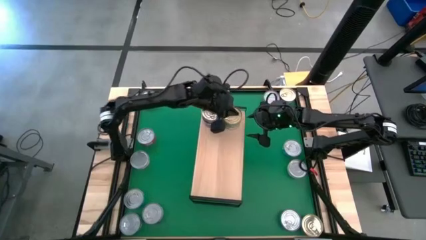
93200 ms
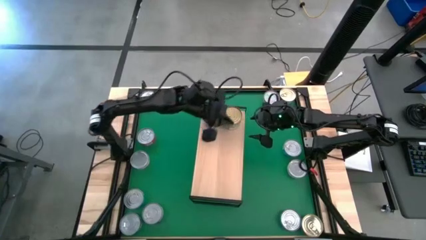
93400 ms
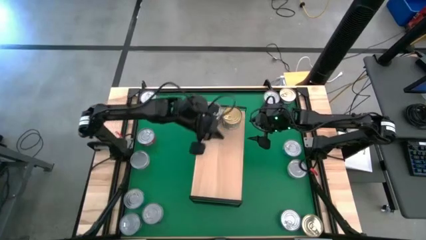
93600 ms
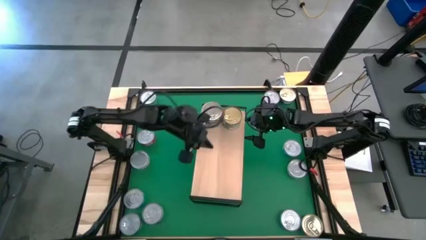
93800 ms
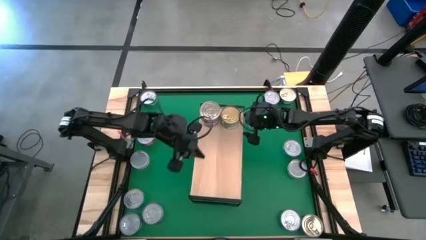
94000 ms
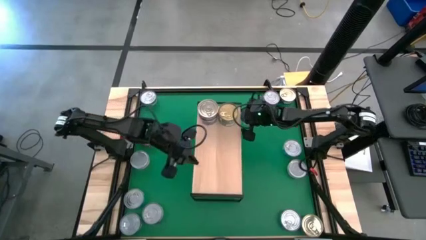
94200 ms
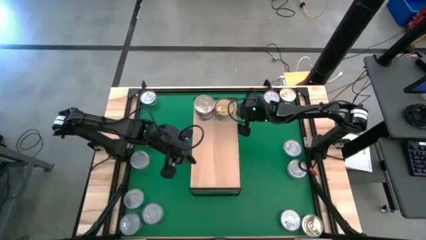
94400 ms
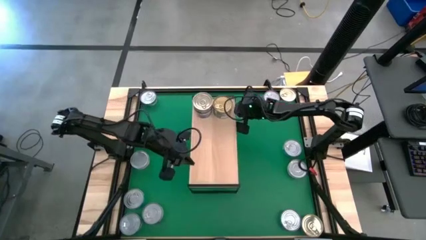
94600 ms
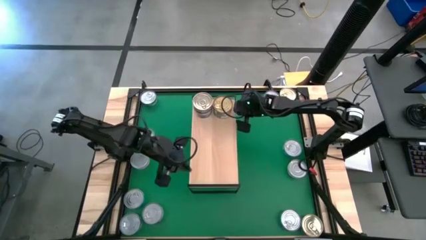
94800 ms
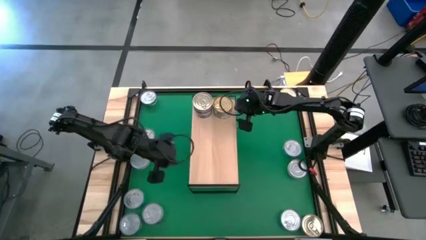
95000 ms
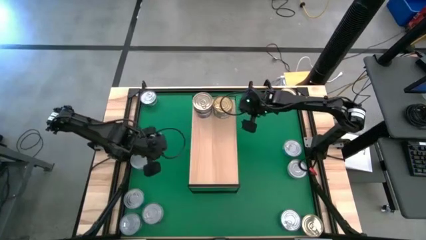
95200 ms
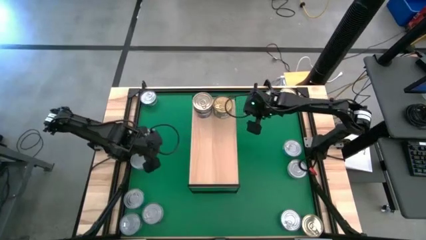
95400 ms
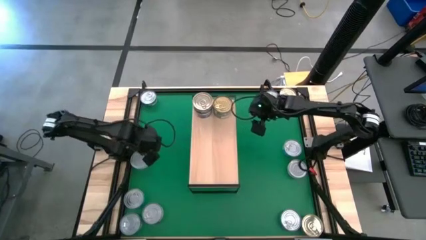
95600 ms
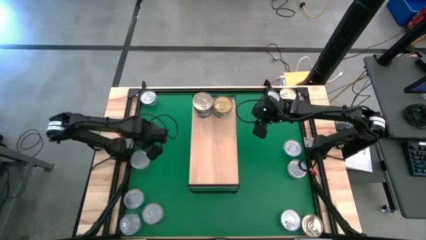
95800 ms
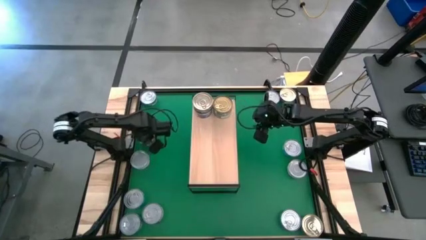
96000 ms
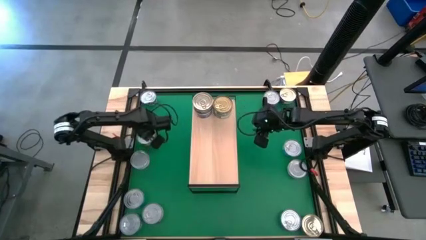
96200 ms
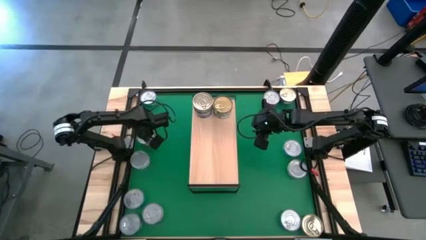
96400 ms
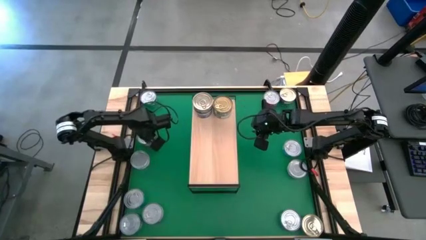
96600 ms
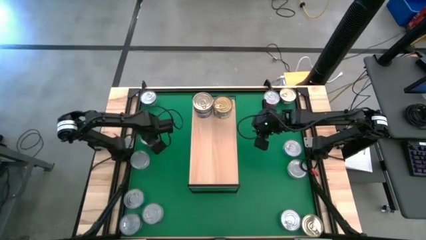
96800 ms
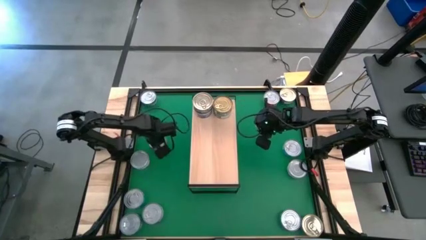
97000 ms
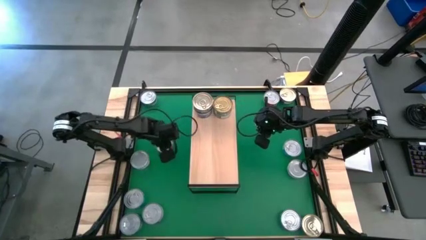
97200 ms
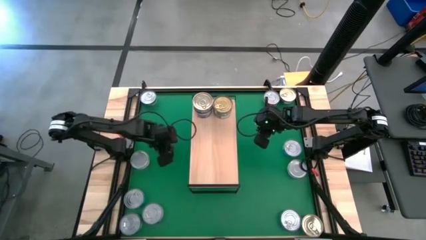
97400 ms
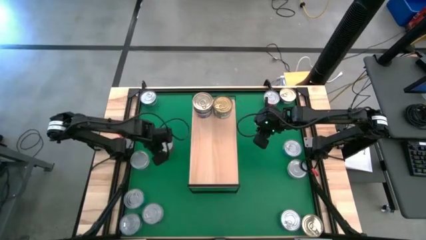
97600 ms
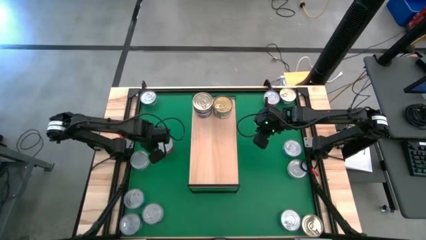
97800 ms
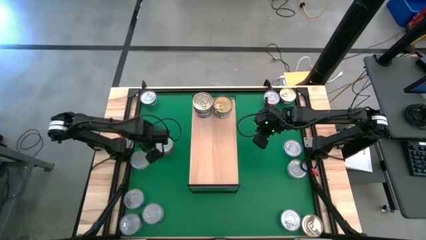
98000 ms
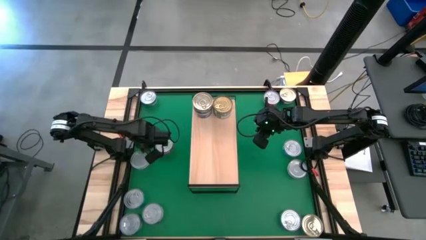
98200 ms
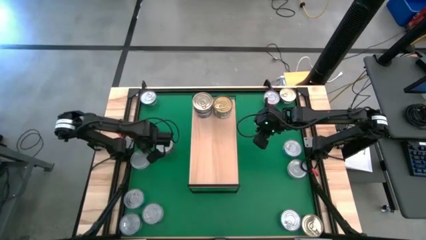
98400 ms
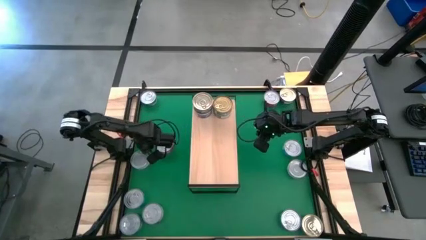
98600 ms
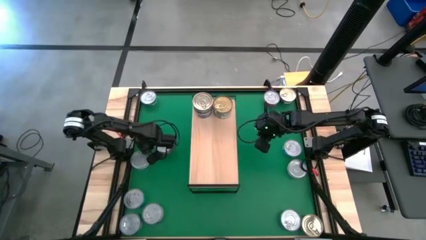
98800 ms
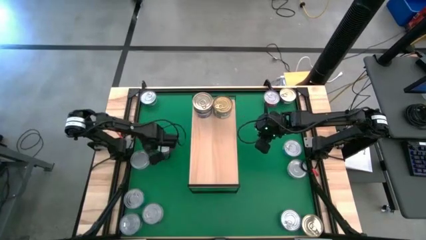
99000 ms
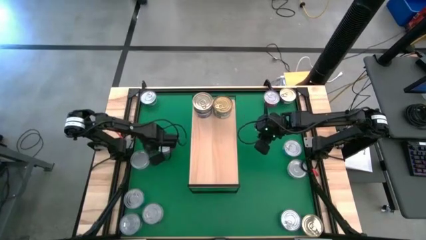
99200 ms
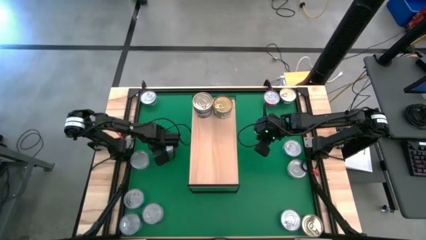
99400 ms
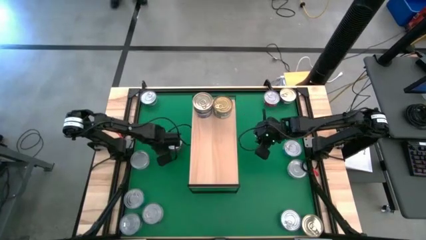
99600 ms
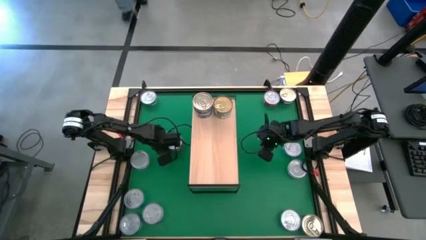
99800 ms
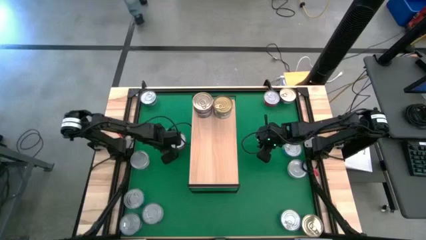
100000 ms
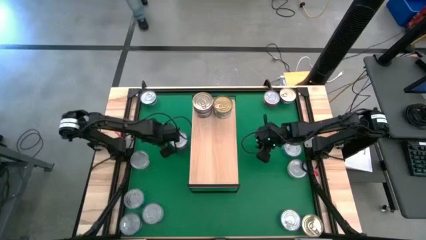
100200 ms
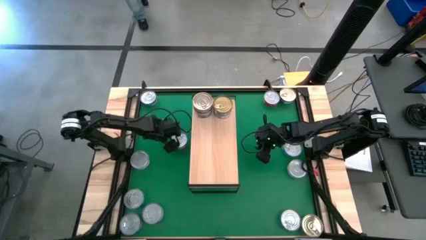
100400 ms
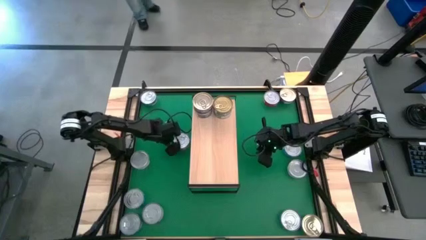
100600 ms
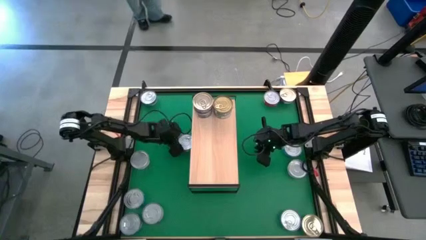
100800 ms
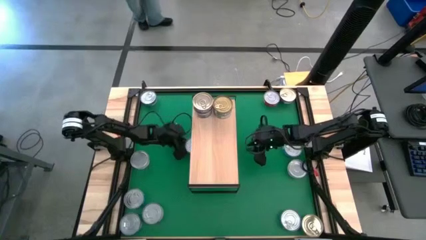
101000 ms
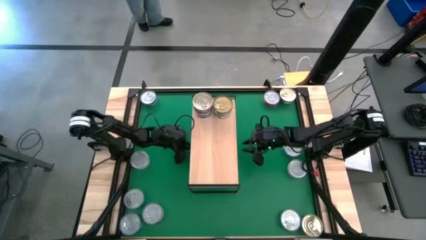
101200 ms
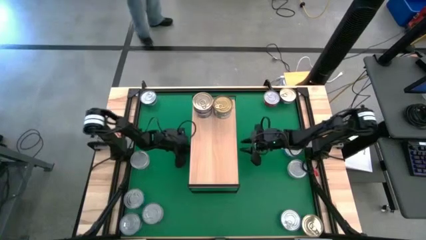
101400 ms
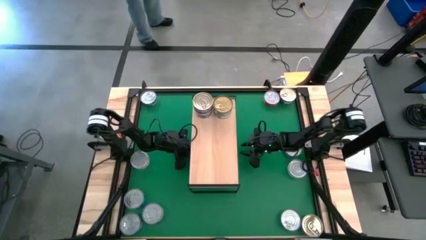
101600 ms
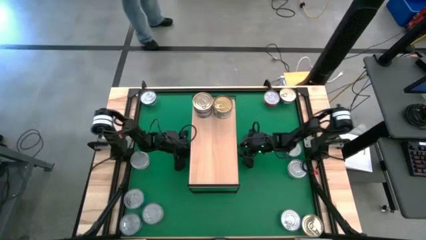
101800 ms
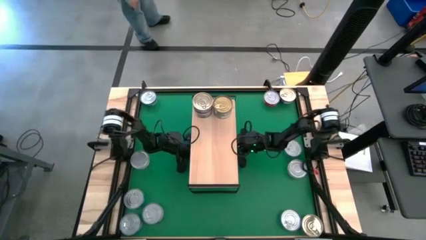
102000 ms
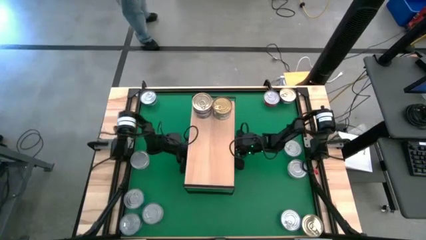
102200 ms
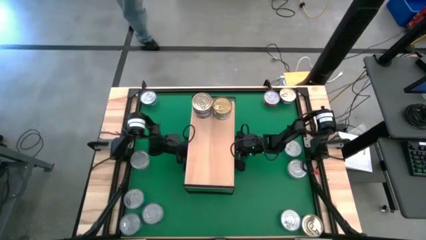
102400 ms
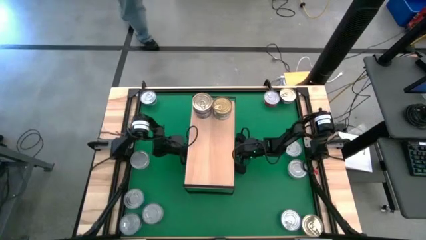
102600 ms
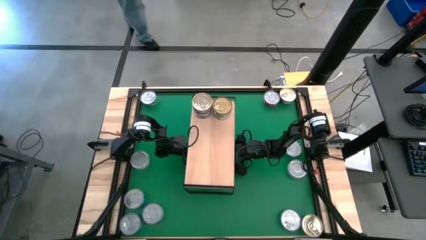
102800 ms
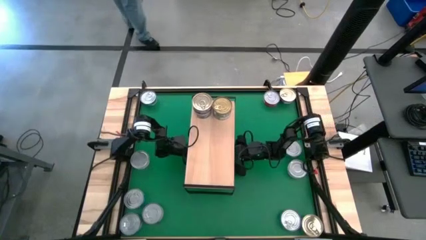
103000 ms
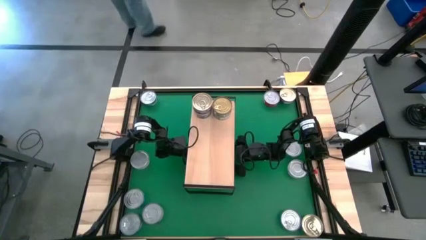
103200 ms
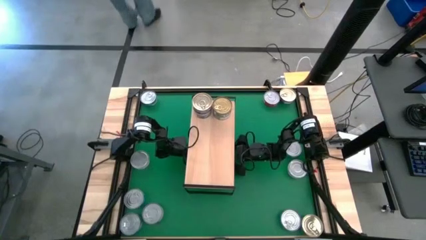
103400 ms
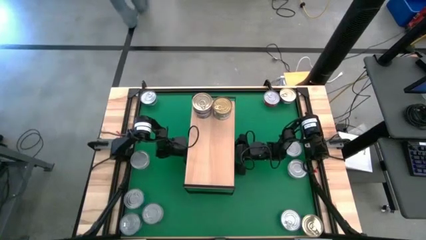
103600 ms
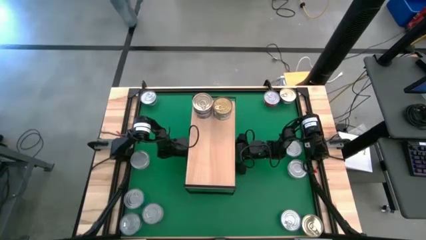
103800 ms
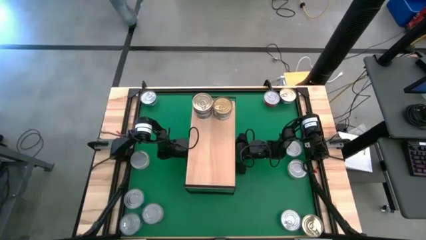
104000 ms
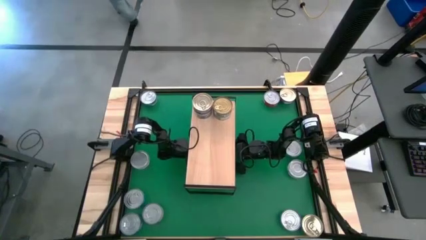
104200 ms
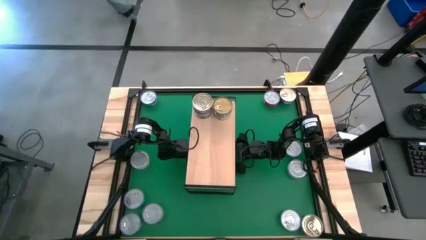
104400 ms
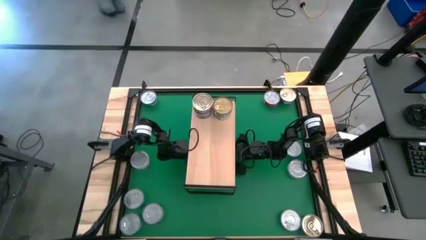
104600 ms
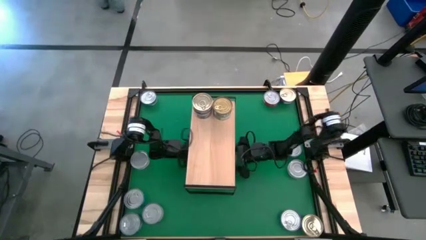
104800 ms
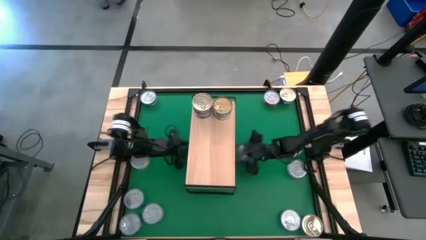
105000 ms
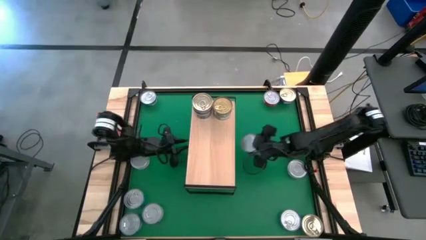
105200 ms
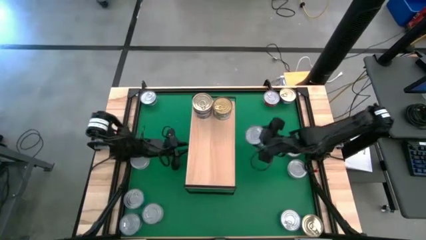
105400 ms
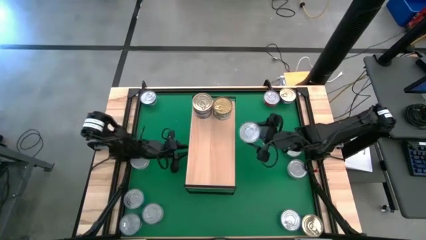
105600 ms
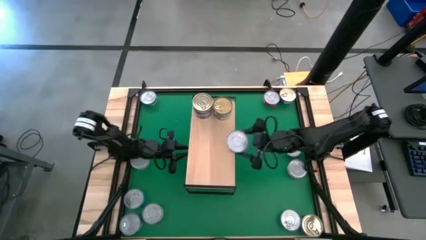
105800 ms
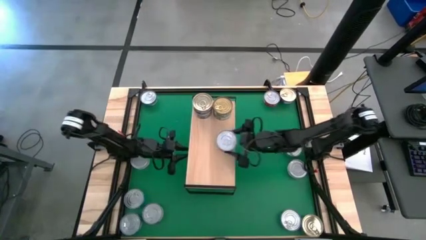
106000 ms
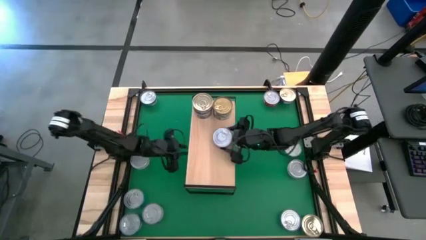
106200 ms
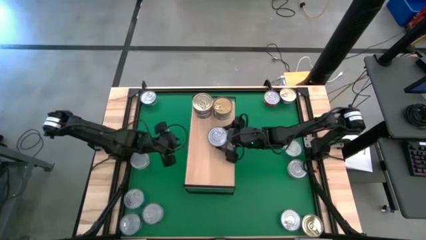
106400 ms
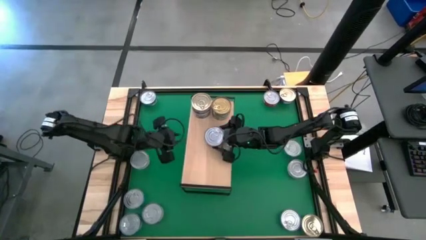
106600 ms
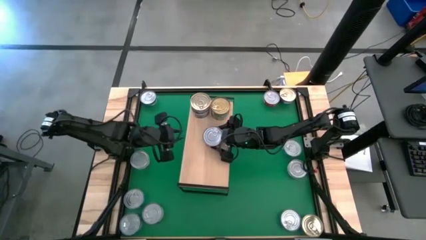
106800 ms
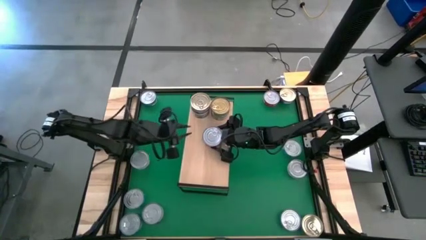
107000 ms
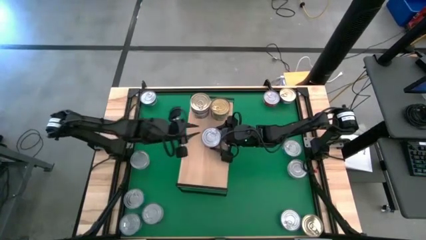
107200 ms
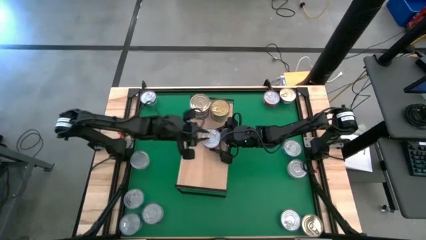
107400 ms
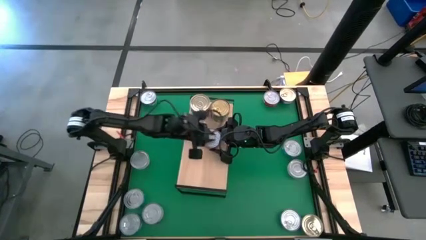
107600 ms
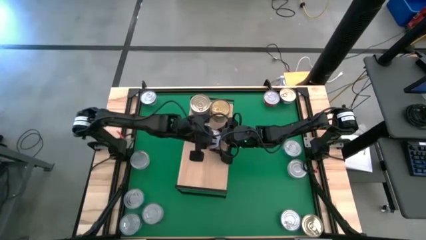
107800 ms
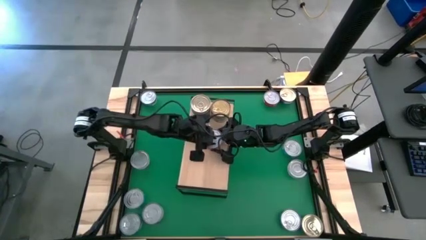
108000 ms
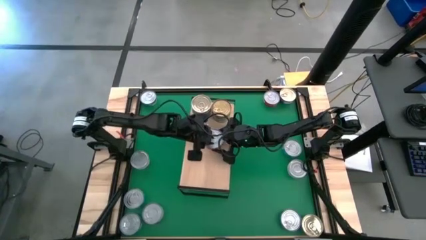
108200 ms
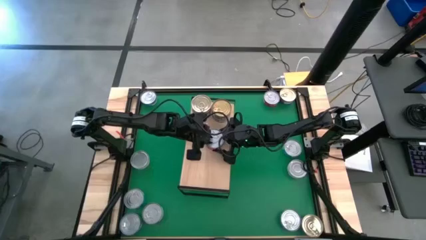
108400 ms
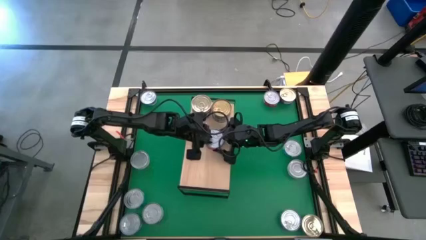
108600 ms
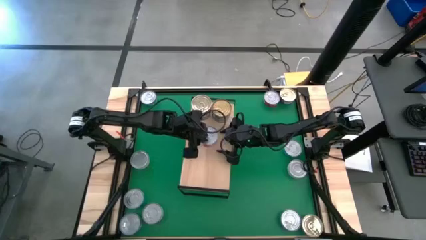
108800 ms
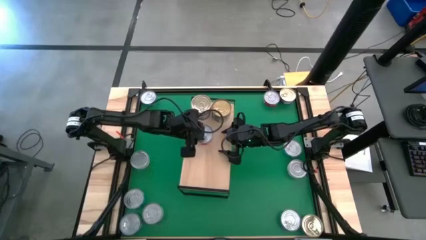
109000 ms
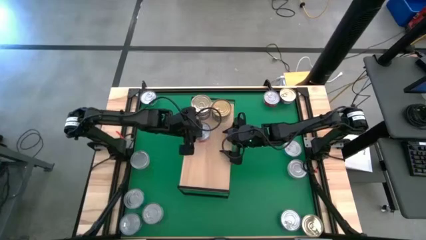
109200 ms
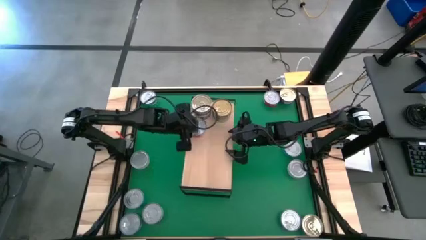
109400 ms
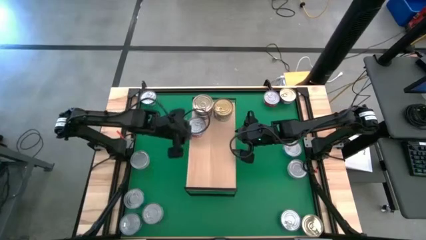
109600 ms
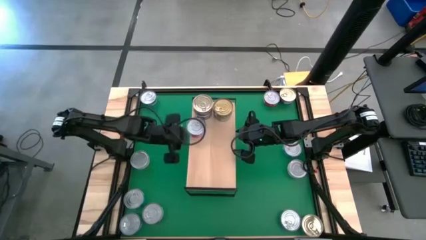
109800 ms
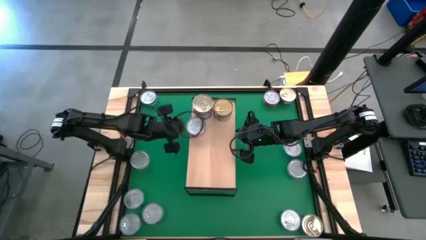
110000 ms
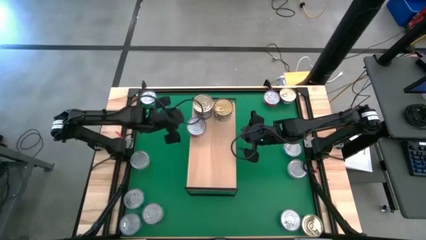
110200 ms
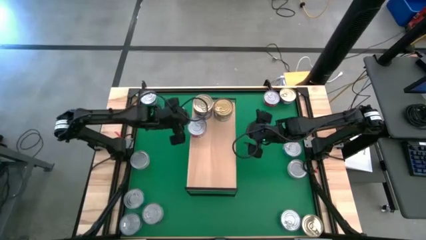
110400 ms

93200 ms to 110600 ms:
Task: Stack canned seafood by type on shelf
Put the red tuna can on the shelf
